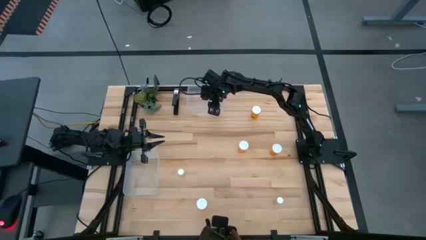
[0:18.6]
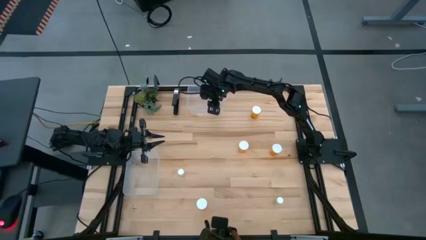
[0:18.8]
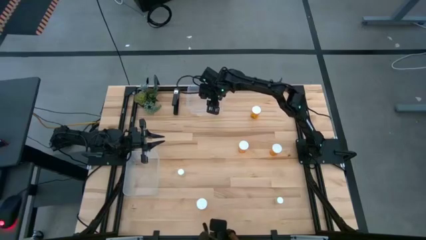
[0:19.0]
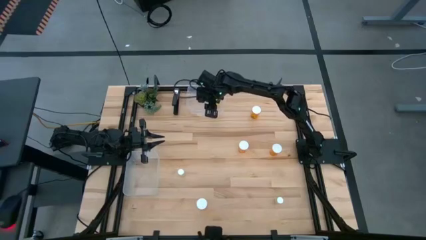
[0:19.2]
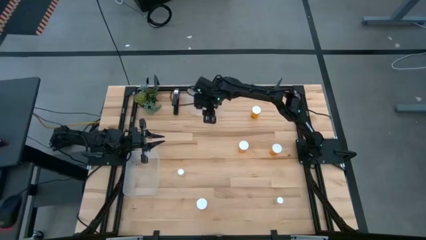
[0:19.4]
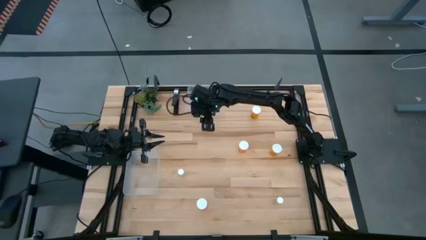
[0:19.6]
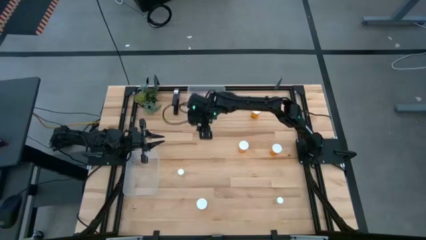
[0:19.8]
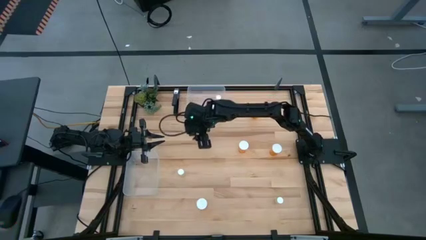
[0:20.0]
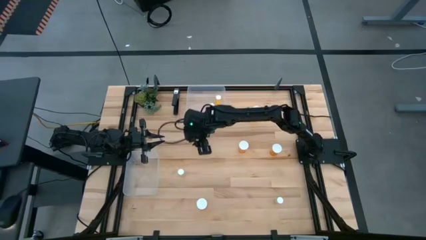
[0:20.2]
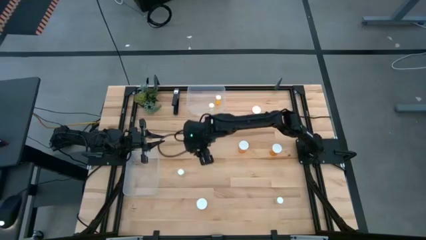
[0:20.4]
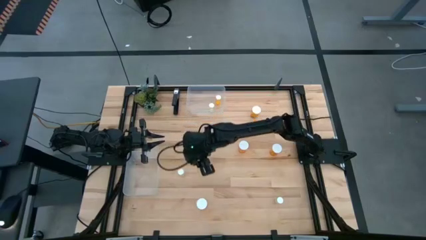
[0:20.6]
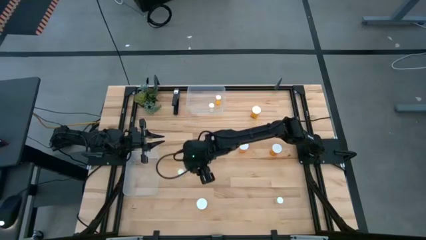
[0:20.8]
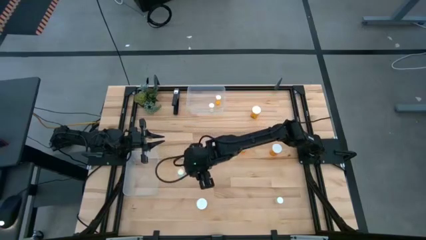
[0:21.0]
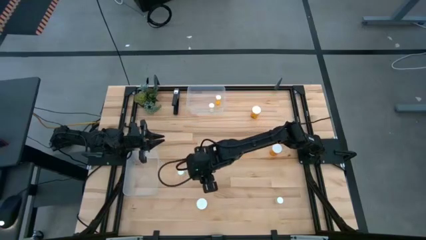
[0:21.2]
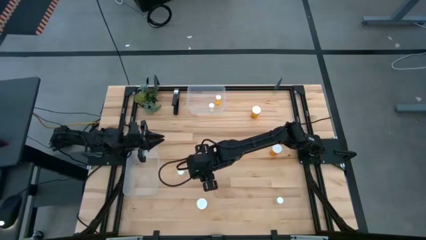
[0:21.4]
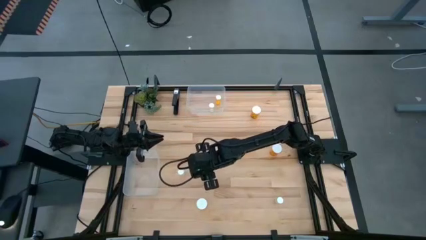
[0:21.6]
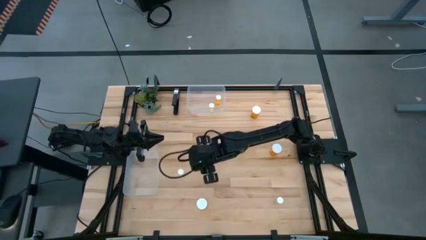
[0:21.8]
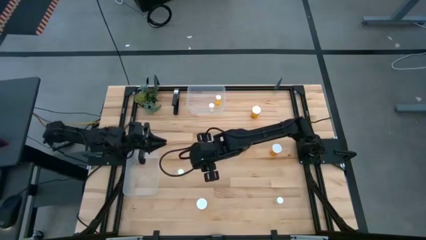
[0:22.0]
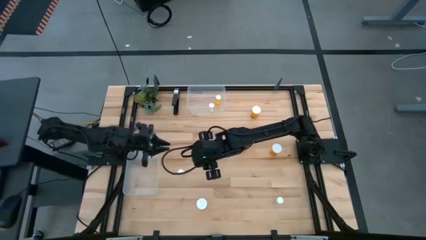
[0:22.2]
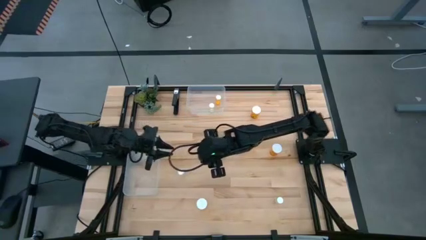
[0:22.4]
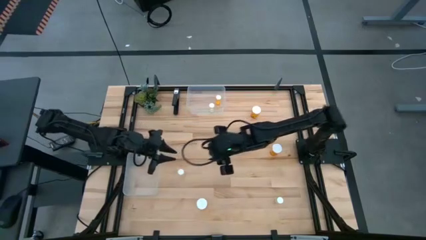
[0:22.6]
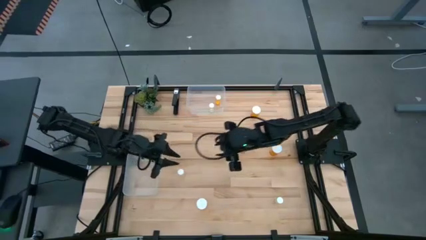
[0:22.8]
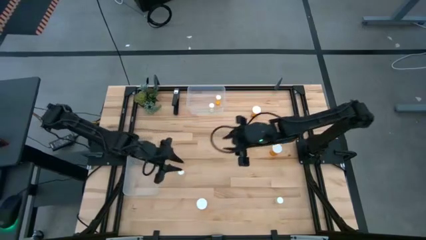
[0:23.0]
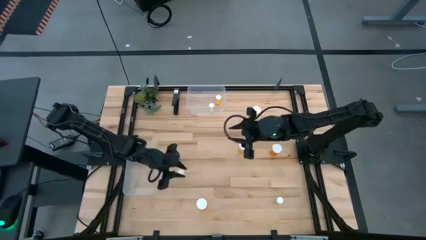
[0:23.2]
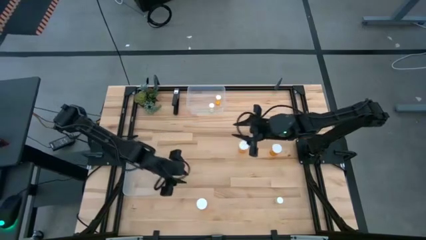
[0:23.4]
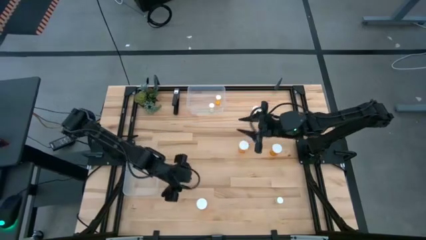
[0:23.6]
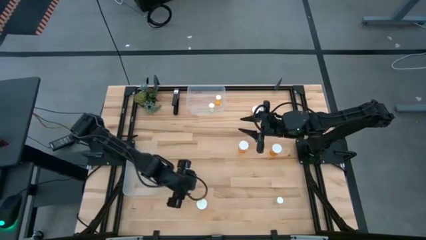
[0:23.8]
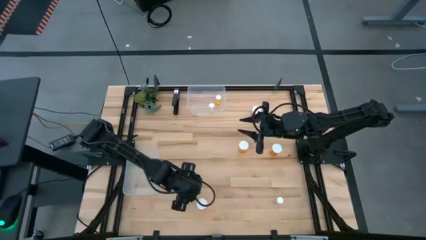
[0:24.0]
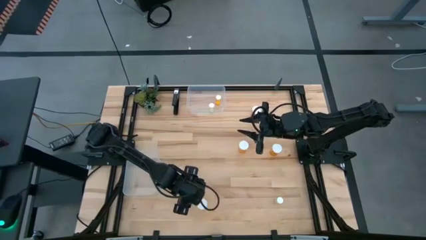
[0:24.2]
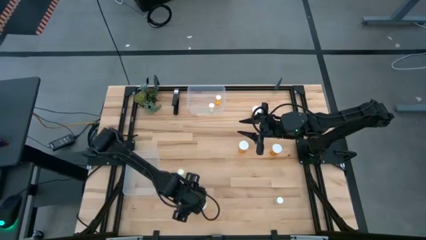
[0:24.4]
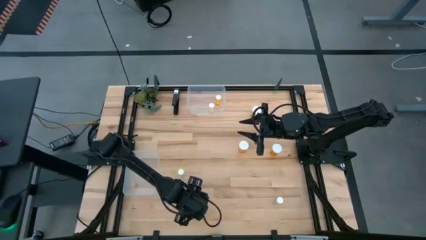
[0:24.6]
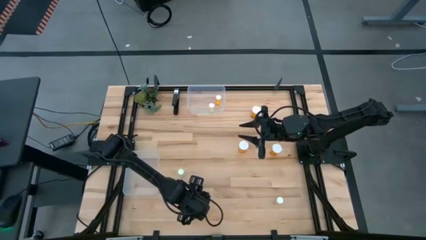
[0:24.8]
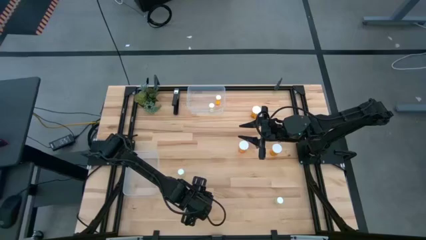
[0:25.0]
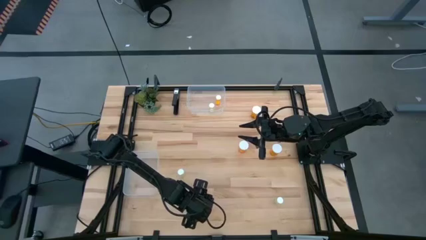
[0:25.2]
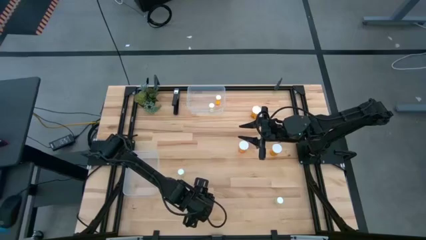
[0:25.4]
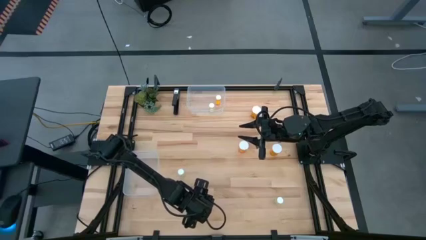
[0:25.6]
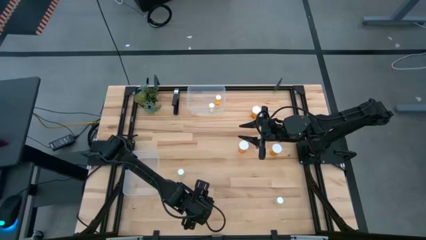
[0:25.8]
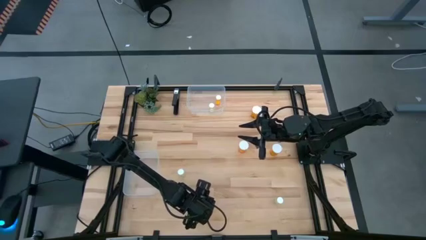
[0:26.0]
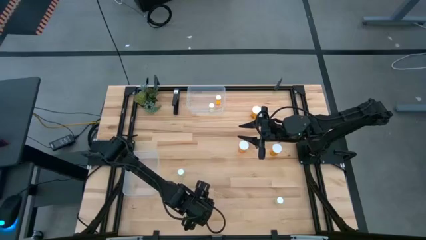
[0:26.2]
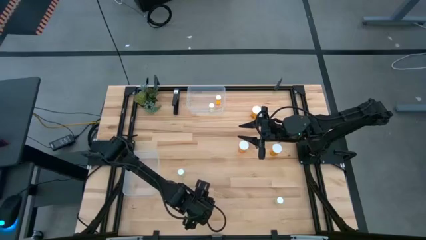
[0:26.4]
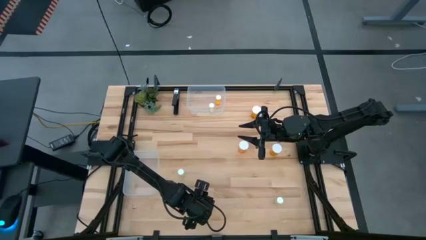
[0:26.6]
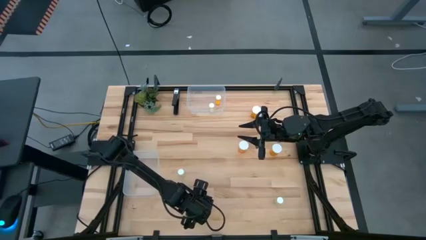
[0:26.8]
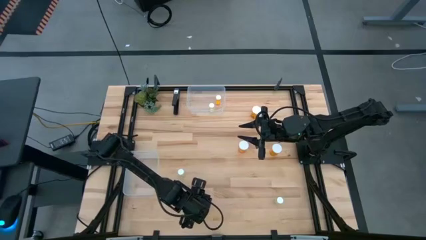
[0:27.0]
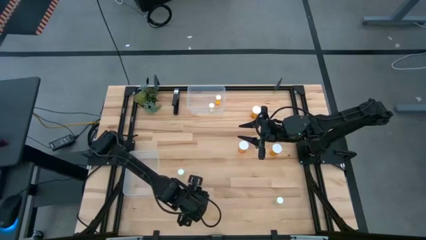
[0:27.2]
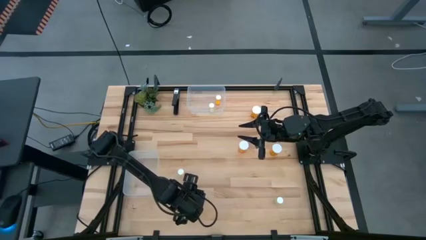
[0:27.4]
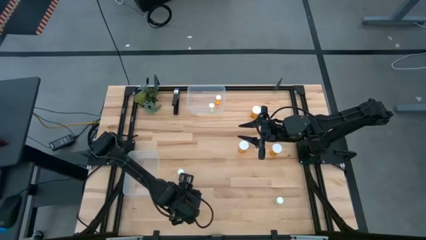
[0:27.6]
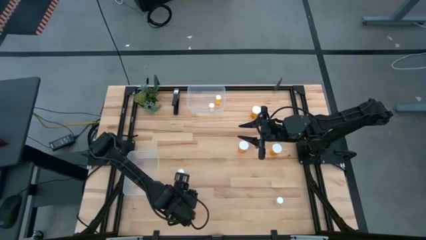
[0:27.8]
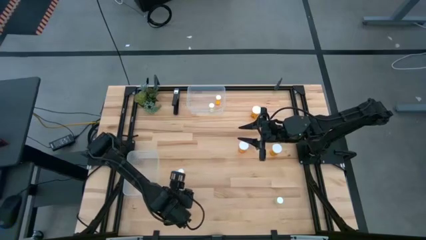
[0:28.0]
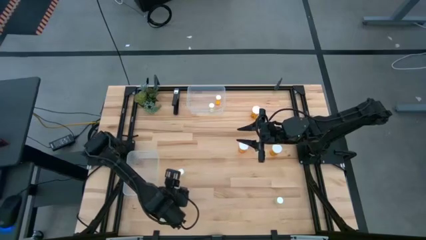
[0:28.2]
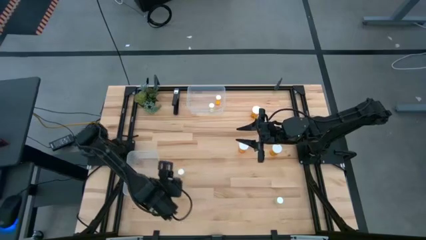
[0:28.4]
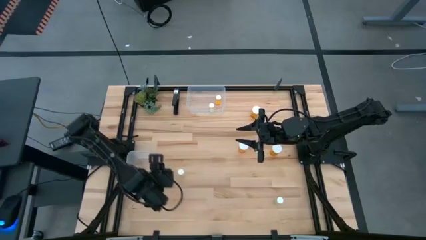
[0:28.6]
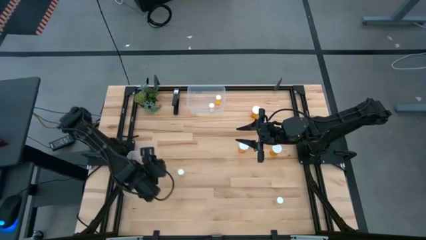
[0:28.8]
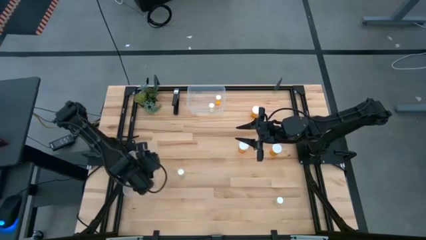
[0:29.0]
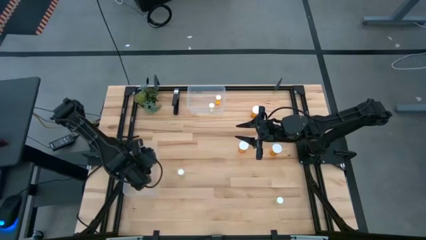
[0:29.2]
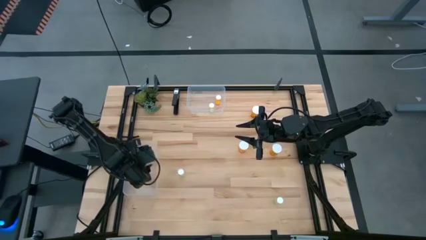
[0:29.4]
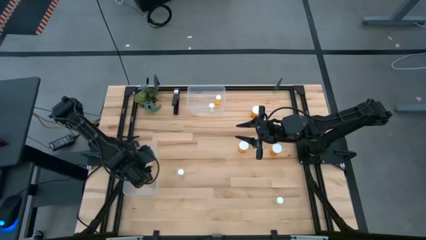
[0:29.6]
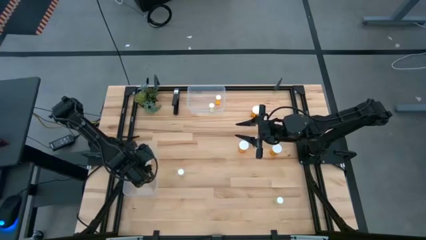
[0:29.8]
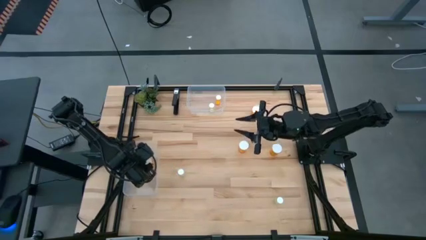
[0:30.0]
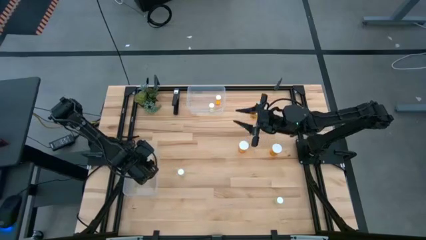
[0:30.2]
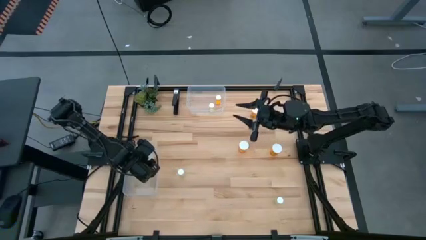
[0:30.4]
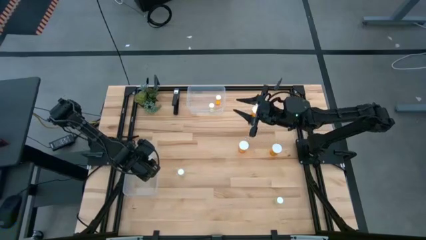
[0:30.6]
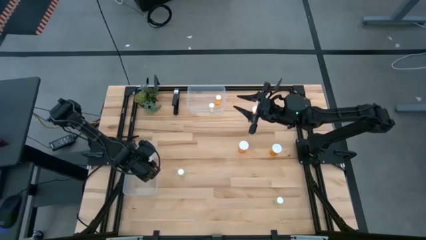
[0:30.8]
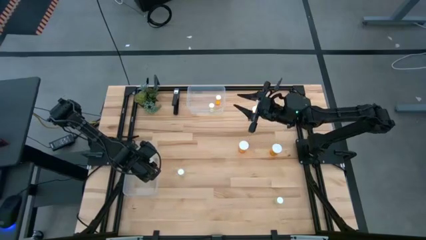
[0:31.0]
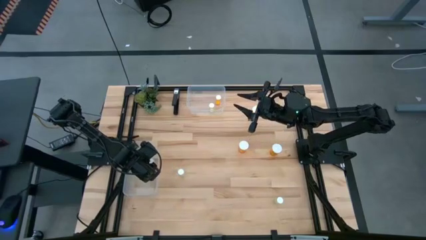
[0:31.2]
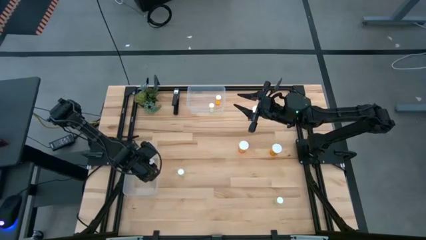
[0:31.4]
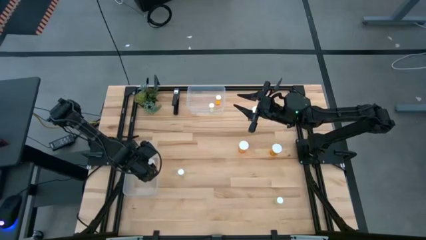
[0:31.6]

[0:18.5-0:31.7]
Task: Pick and place medicine bottles into bin by pill shape (circle, oval)
Put the bottom left big orange pill bottle into the bottom transparent bin

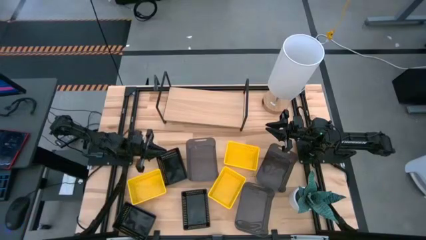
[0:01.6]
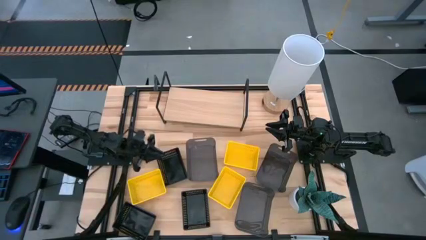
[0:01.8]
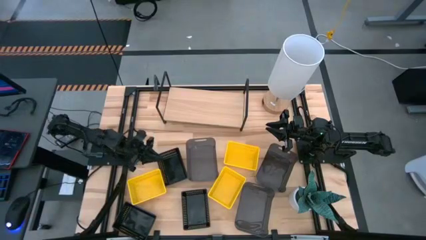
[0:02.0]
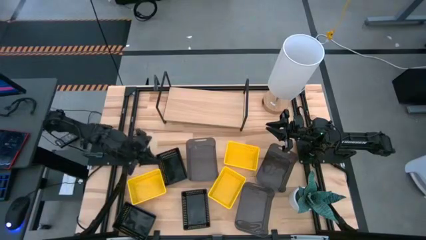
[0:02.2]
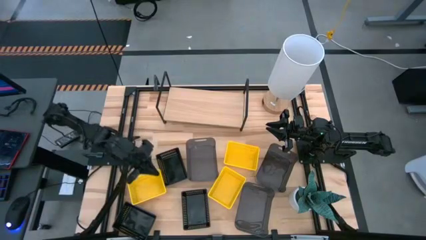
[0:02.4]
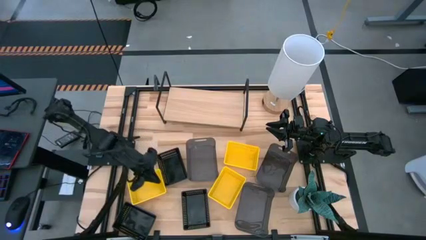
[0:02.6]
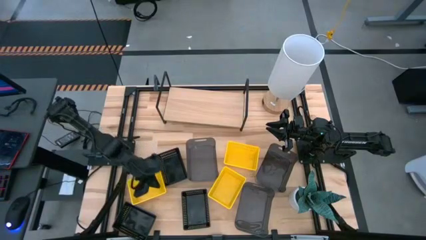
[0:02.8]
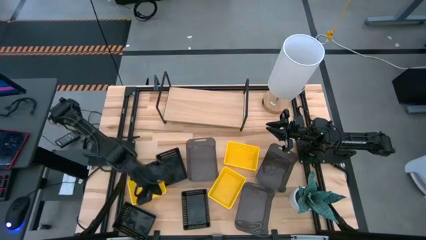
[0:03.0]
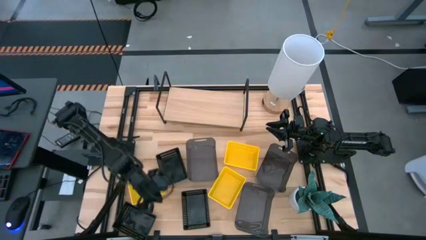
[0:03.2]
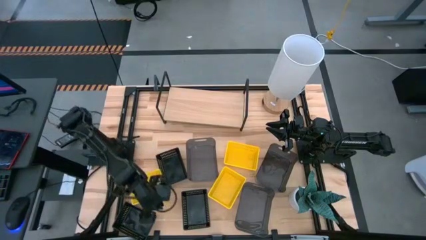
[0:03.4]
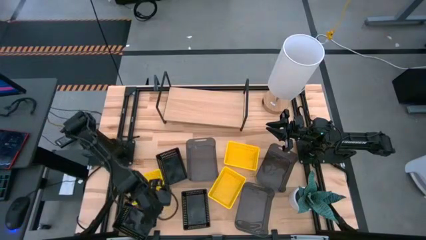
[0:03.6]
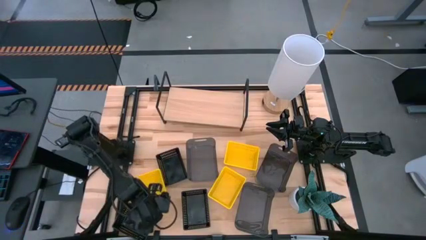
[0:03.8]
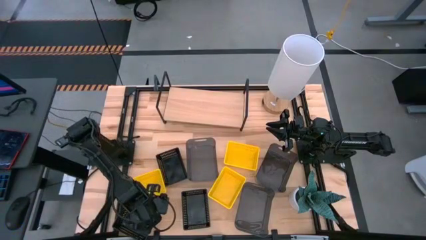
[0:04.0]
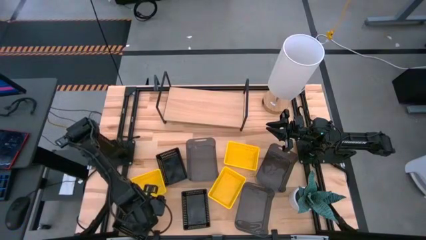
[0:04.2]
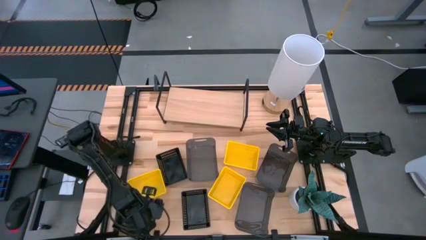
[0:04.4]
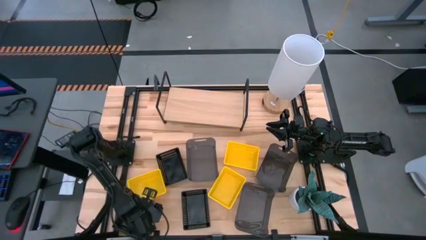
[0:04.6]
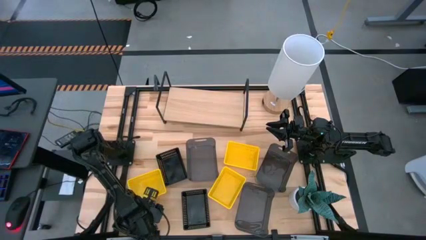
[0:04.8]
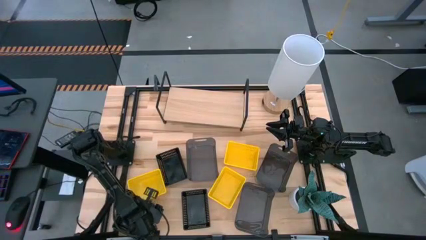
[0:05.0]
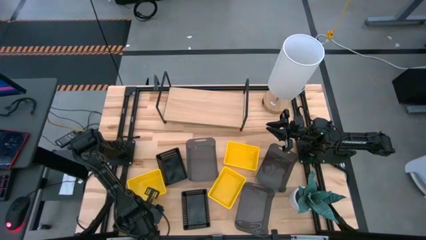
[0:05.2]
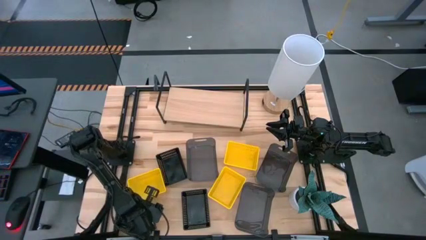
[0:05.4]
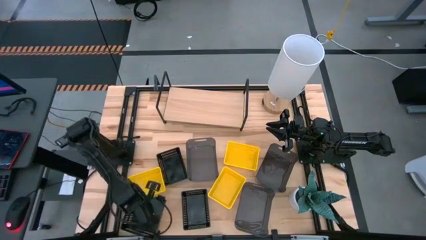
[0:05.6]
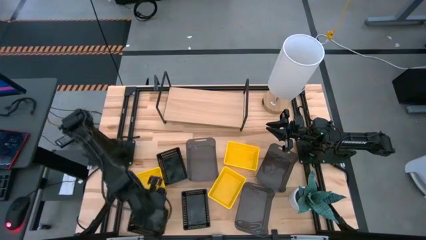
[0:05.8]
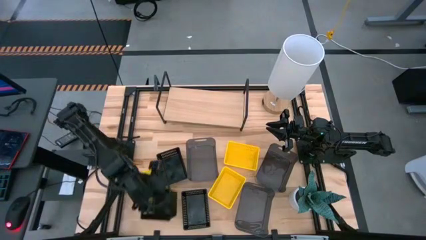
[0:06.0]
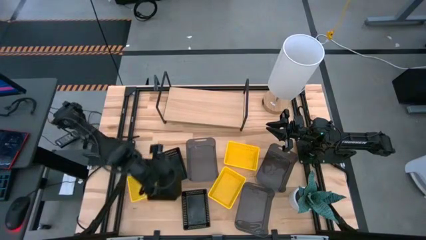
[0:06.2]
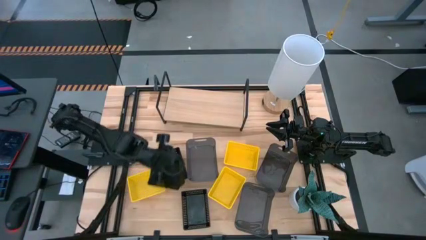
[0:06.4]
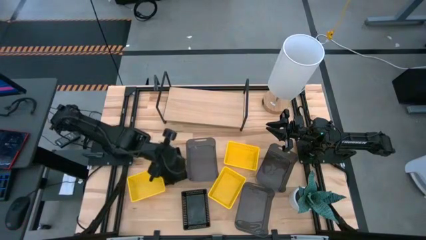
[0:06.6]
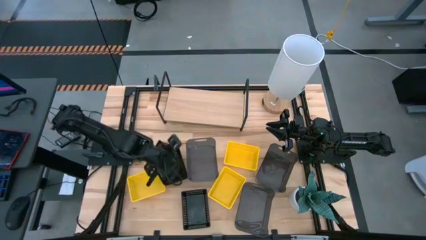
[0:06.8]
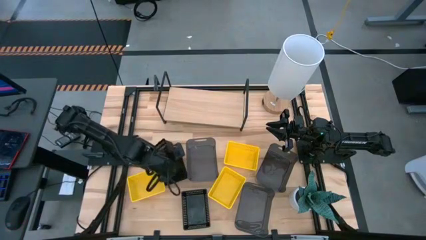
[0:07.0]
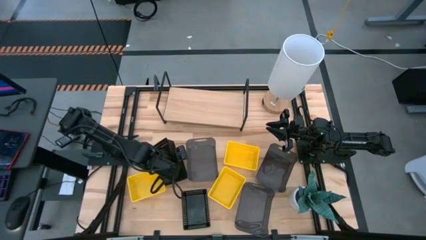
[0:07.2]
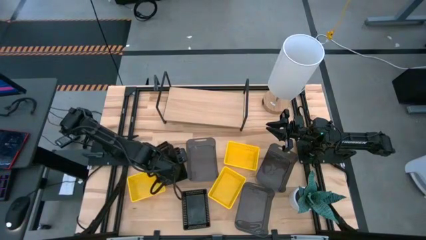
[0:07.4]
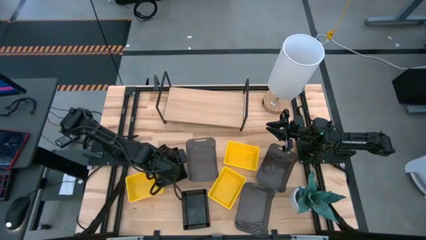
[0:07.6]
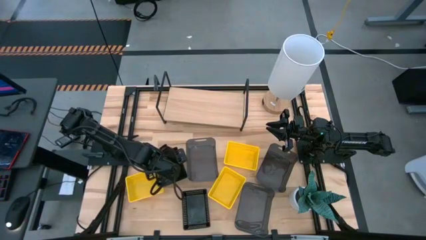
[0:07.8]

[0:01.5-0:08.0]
Task: Stack baskets on shelf by color
Stack the bottom left black basket on top of the top black basket
